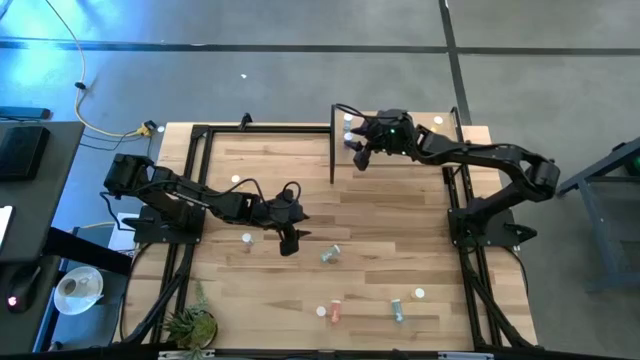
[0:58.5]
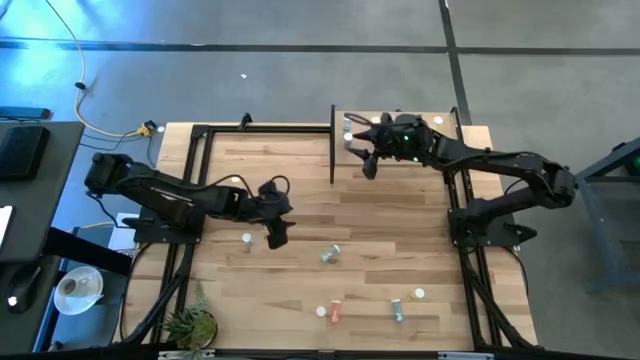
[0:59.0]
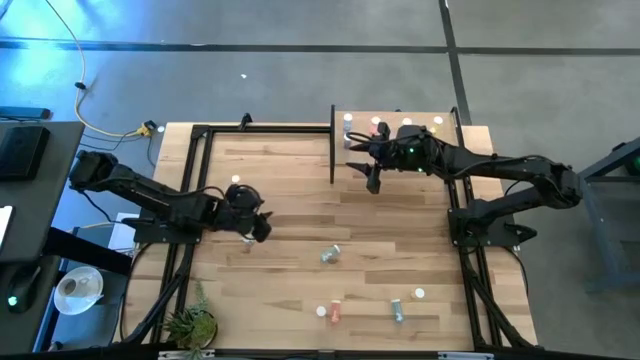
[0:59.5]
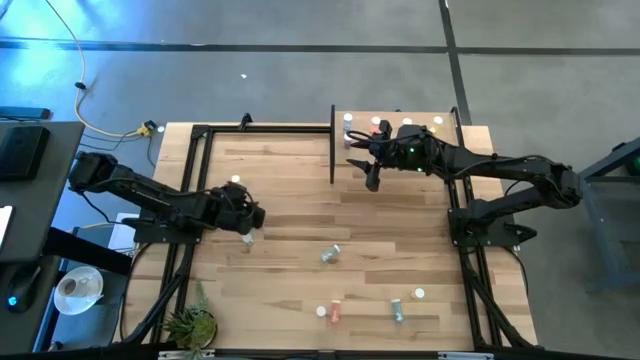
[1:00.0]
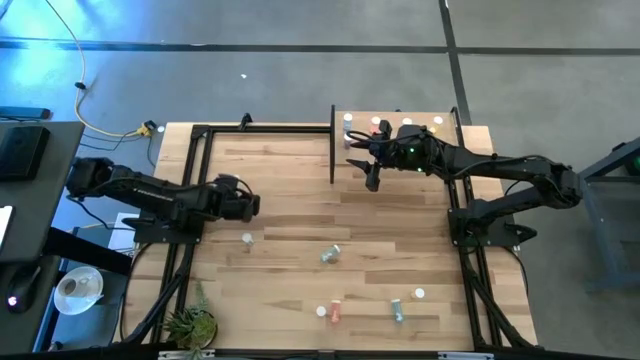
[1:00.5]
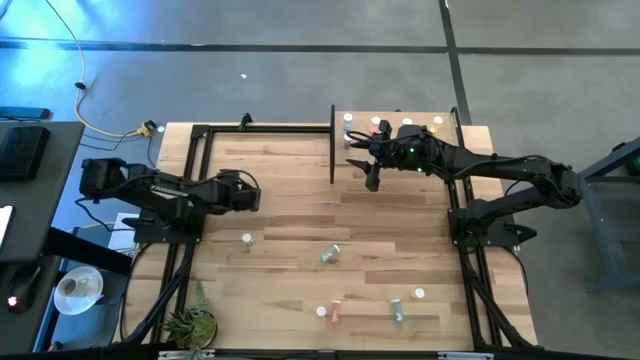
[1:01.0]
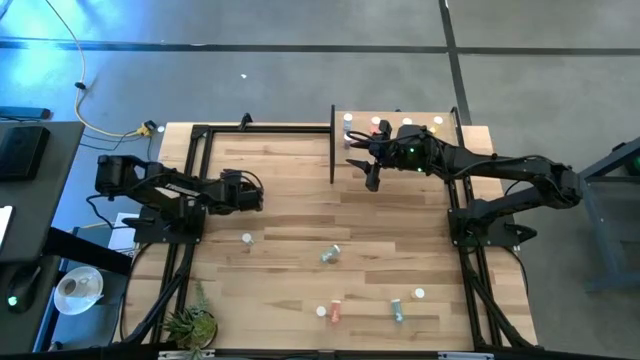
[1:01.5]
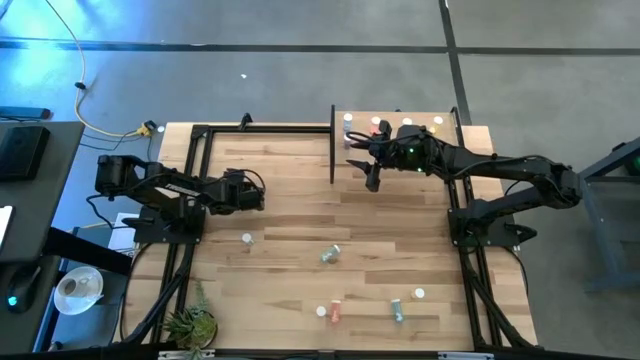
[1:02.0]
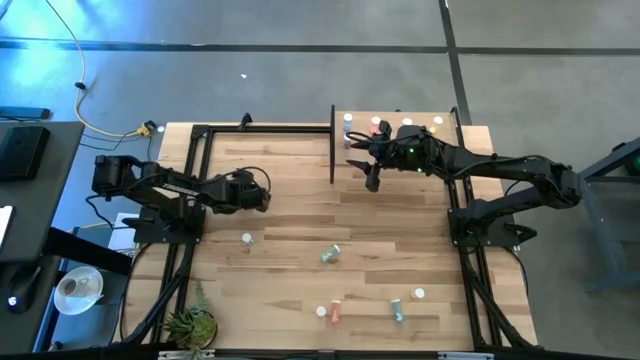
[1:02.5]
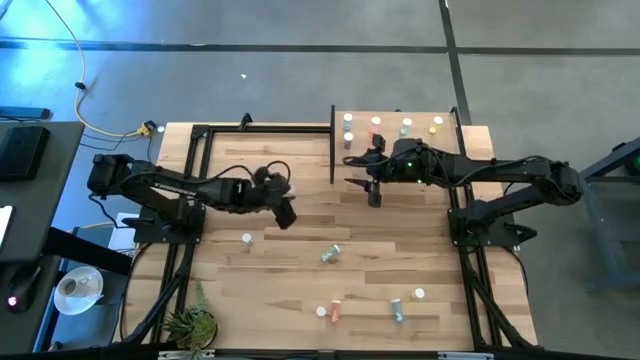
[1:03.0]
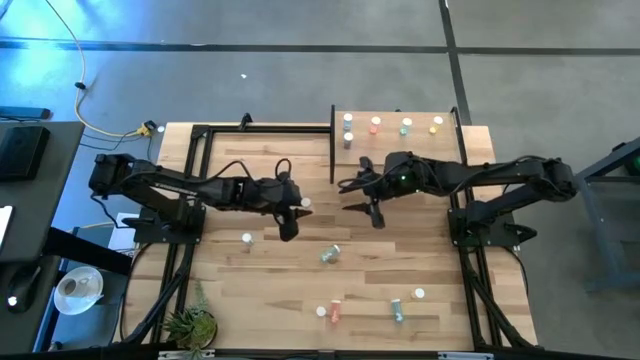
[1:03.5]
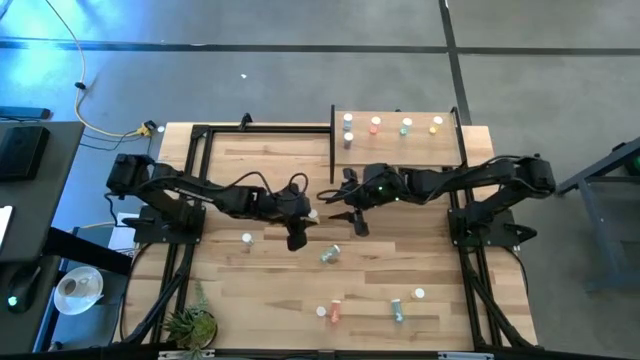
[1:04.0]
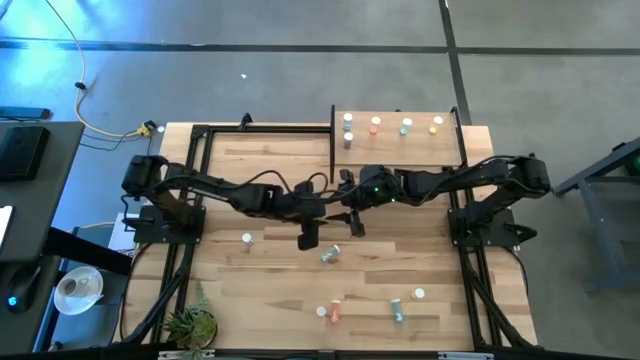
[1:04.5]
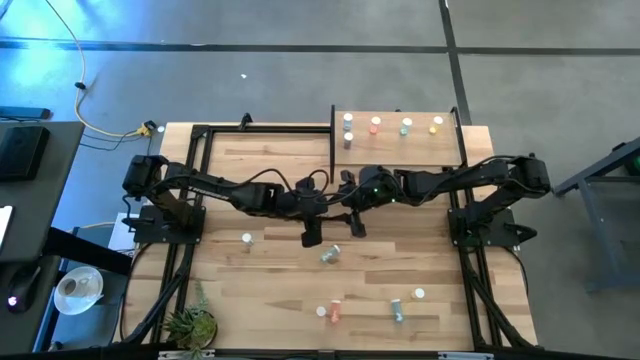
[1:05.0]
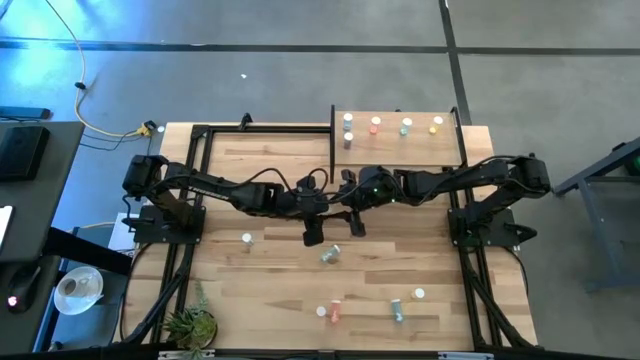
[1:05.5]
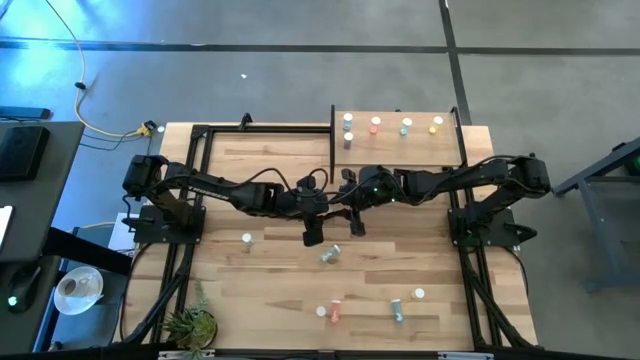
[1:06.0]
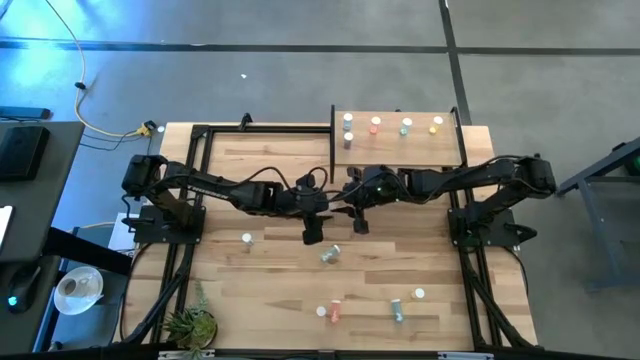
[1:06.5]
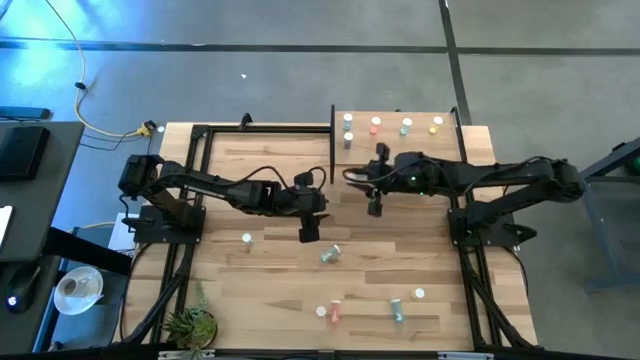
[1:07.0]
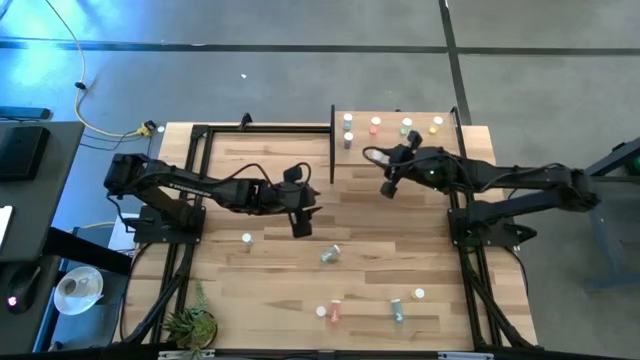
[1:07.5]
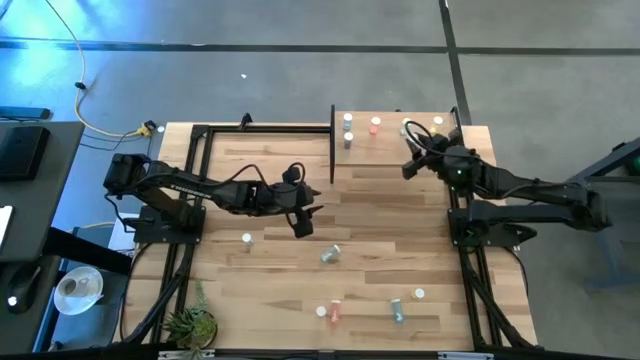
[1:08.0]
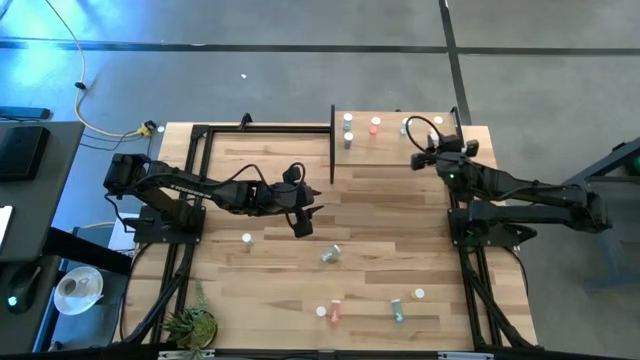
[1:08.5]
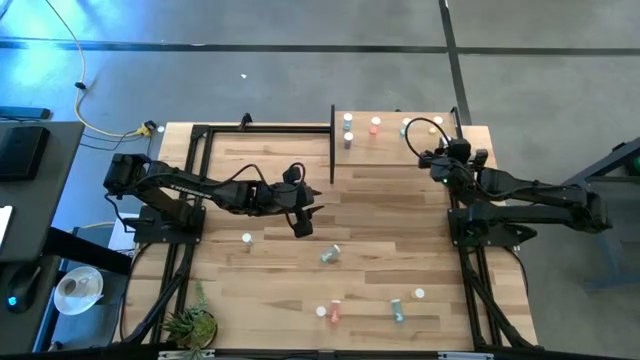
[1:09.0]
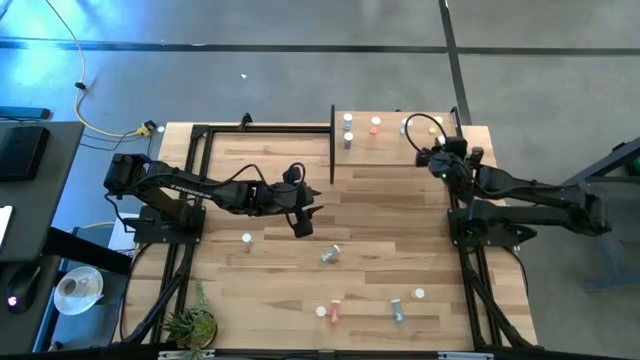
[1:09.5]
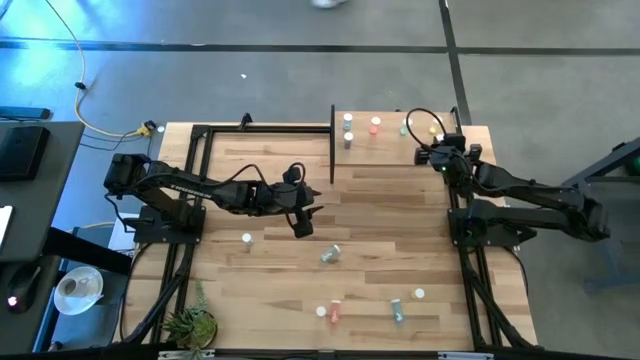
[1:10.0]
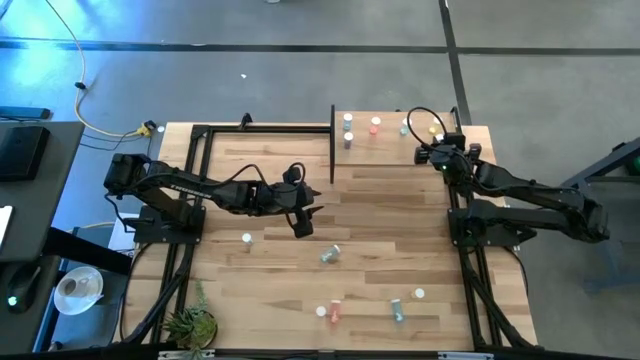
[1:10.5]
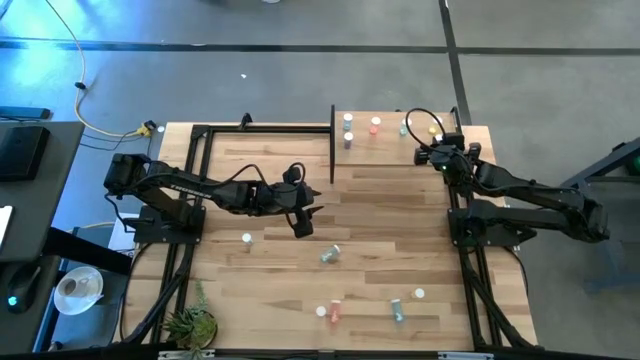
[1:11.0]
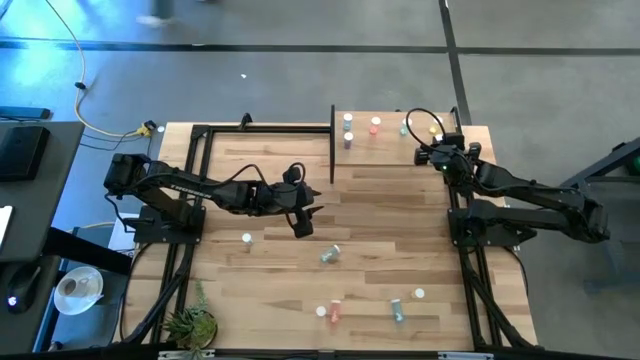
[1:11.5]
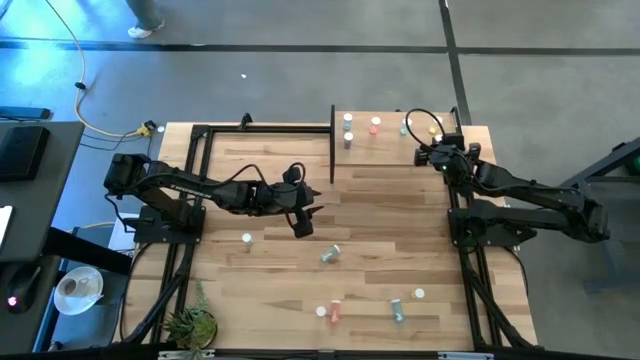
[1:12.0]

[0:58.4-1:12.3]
Task: Pick and place medicine bottles onto shelf by color
Put the top yellow pill bottle on the shelf aligned with the yellow pill bottle

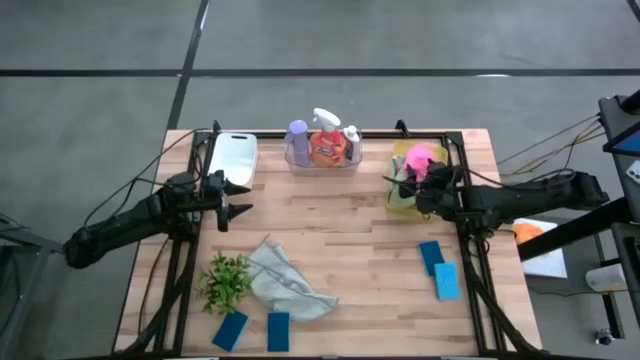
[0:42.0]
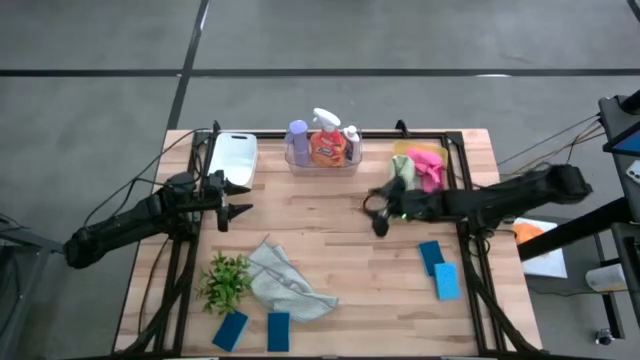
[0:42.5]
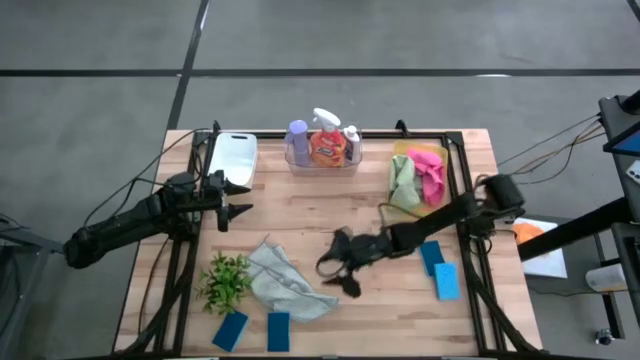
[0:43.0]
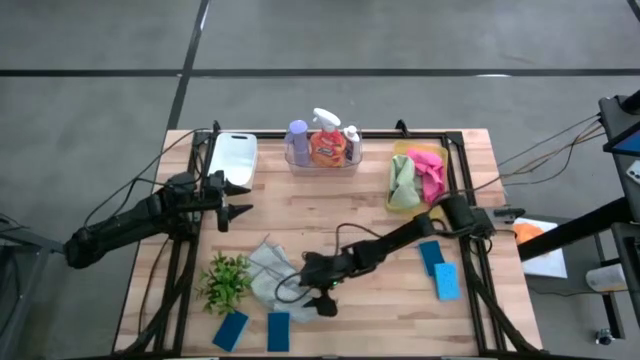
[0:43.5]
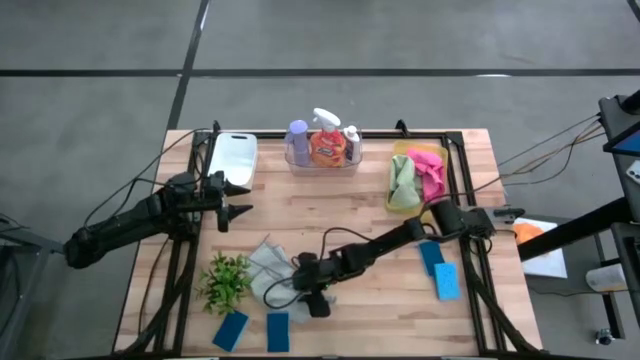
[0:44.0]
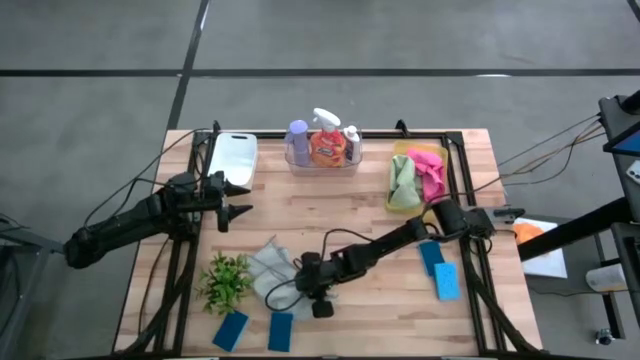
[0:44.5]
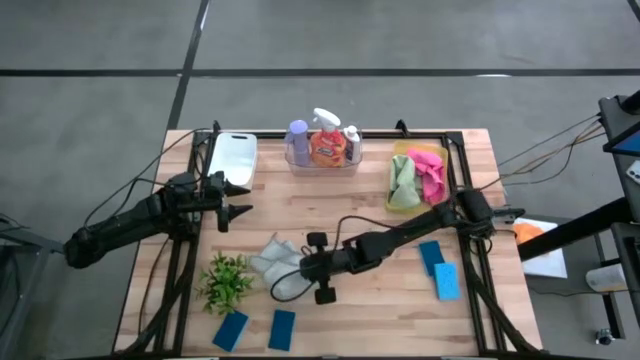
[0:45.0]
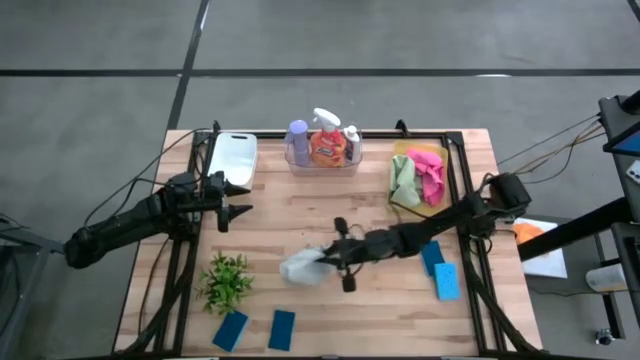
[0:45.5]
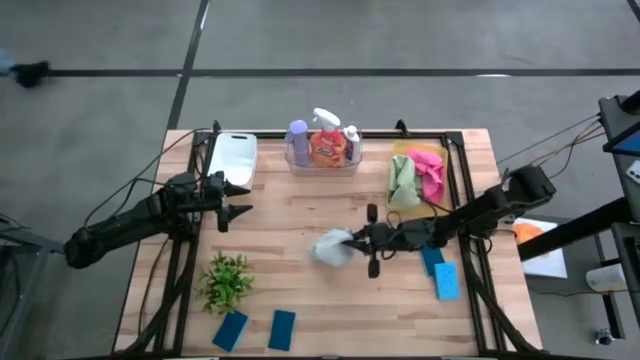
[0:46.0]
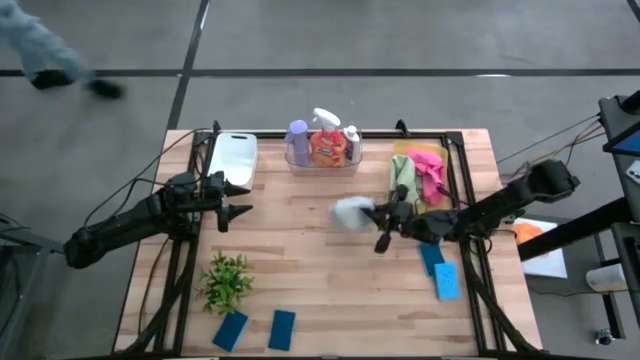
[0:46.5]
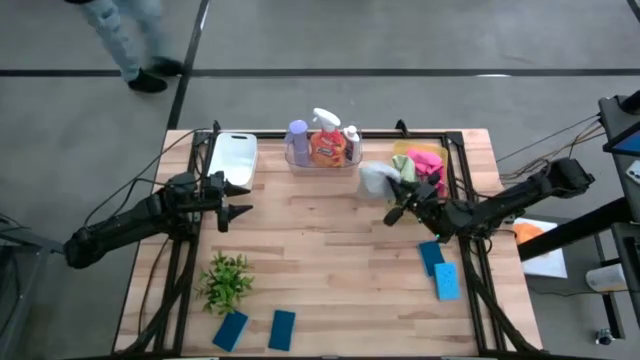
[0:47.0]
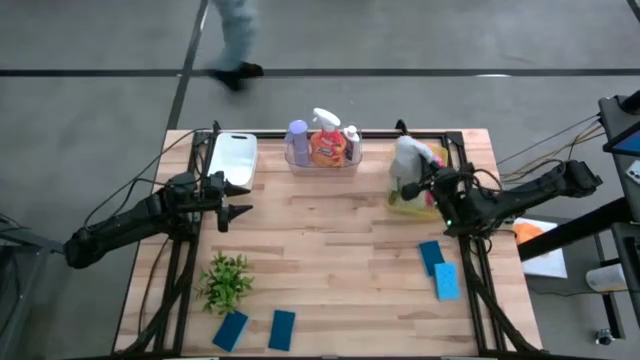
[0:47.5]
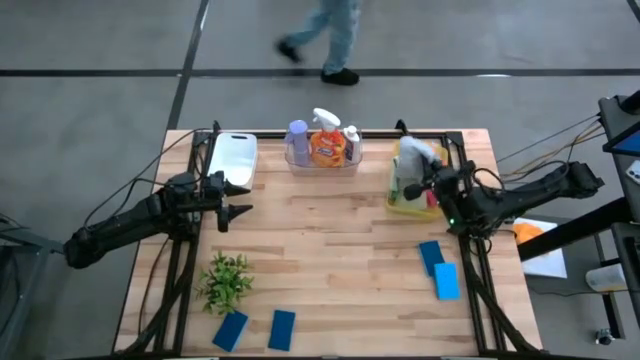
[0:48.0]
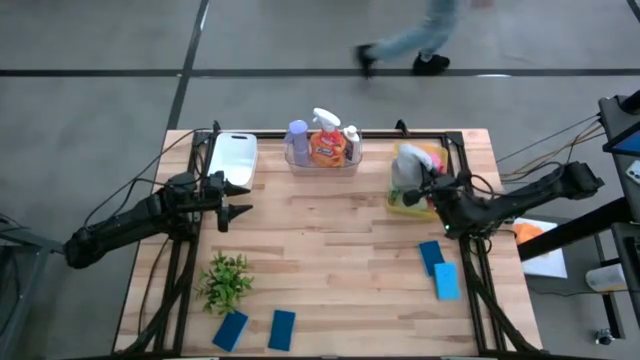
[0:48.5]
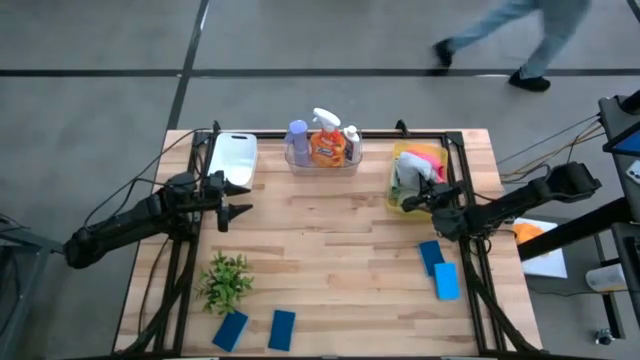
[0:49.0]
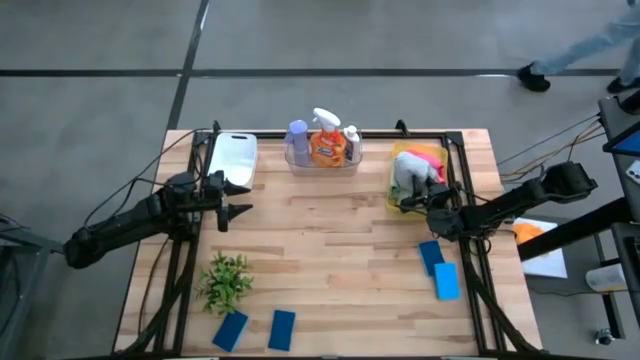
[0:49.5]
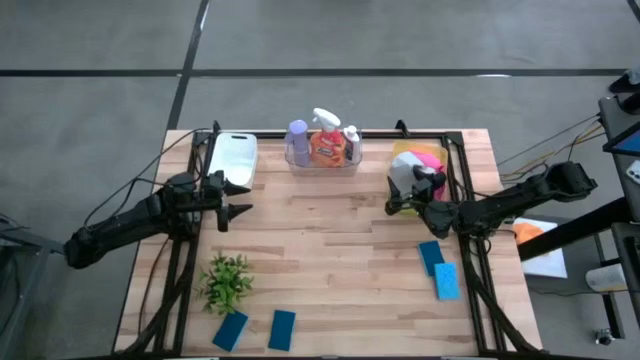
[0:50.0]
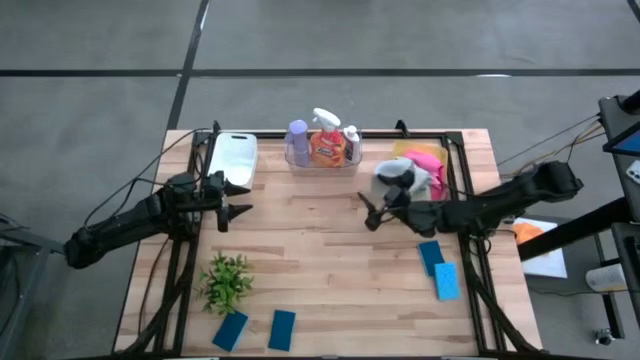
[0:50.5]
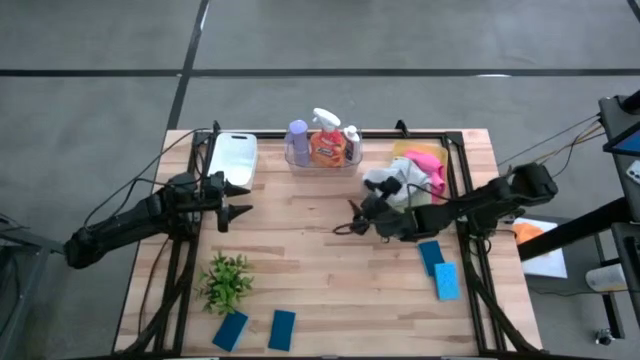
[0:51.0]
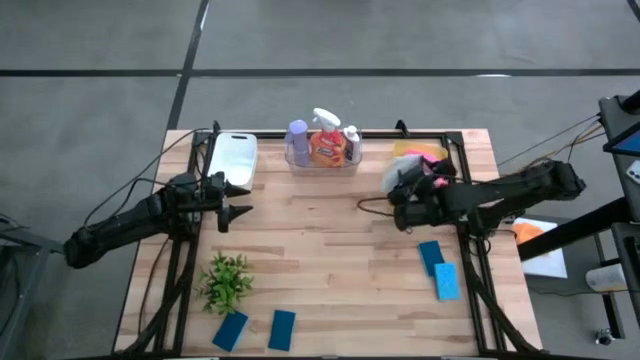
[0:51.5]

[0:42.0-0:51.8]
Task: Pick & Place Kitchen Items
Put the grey towel into the yellow bin
